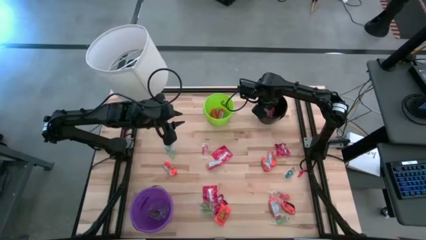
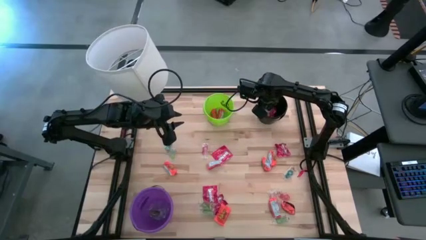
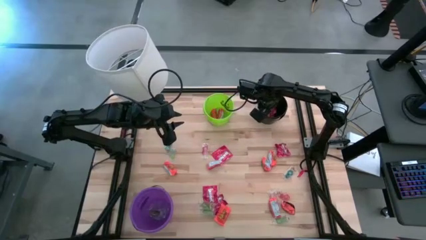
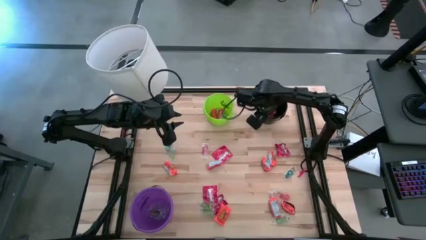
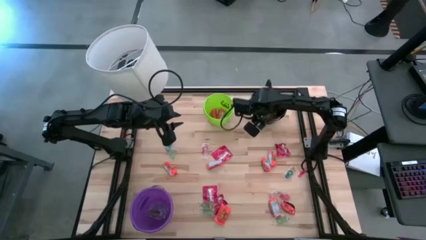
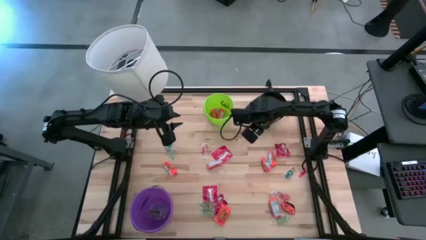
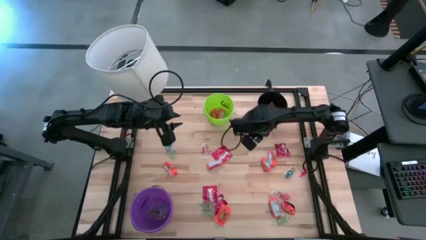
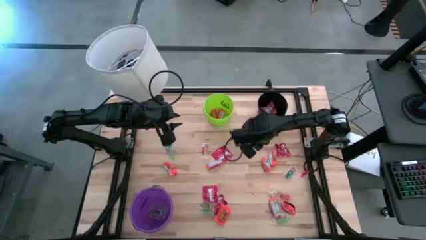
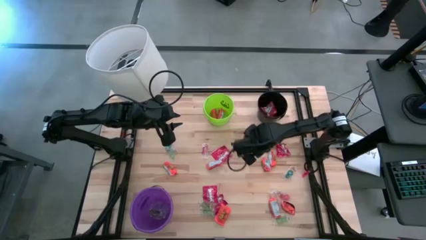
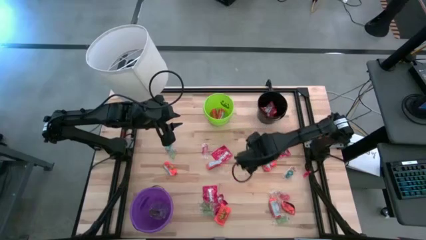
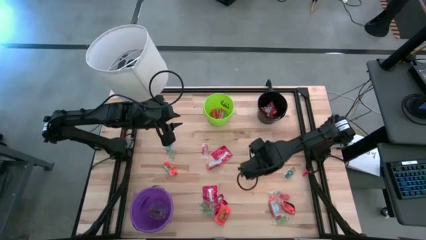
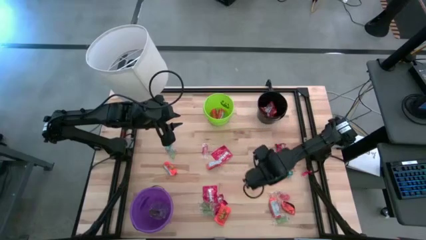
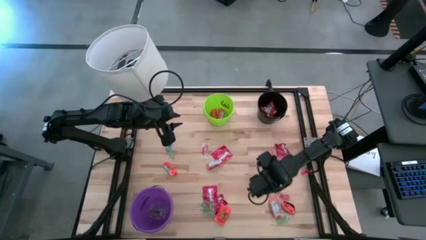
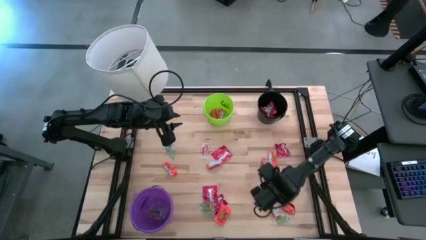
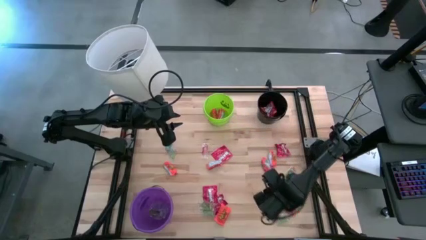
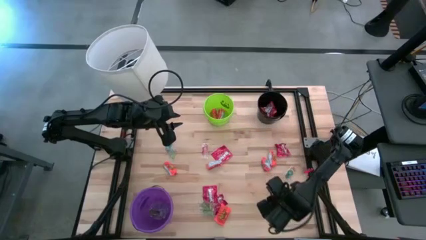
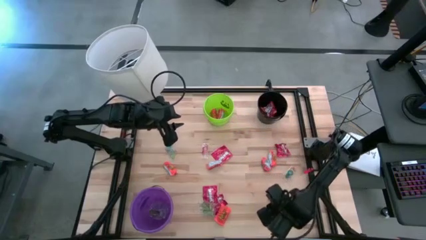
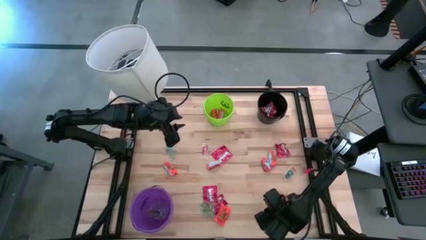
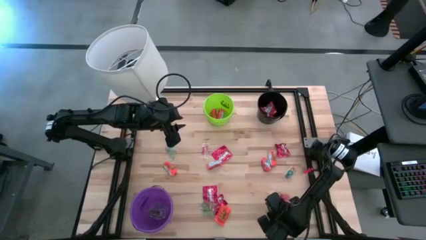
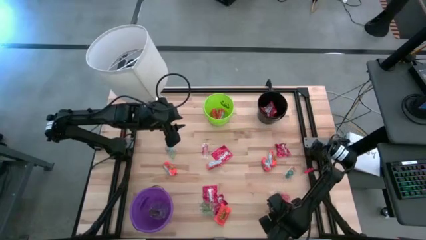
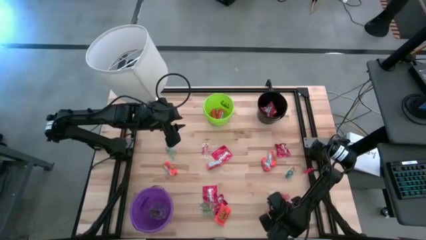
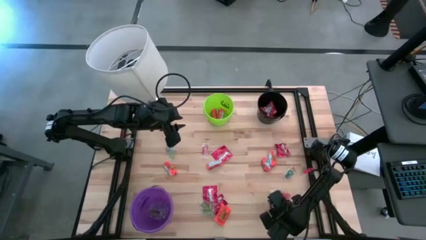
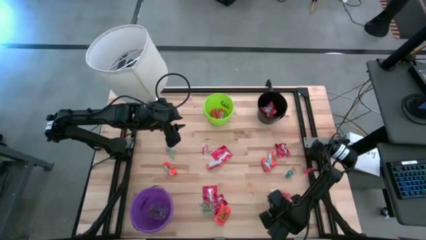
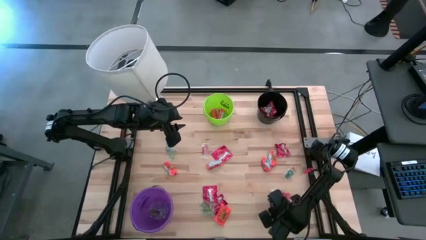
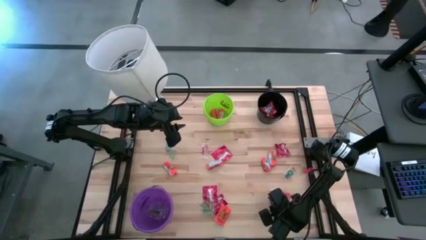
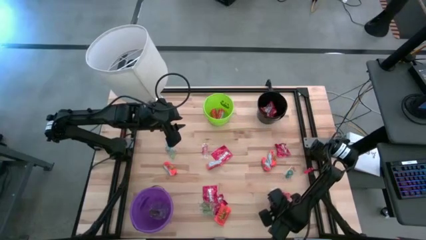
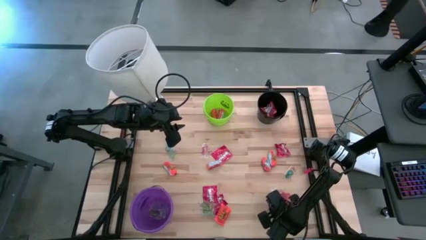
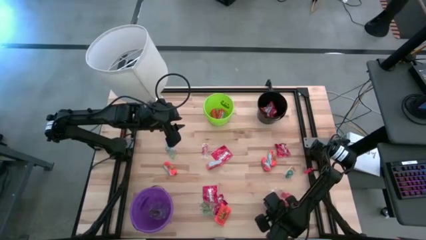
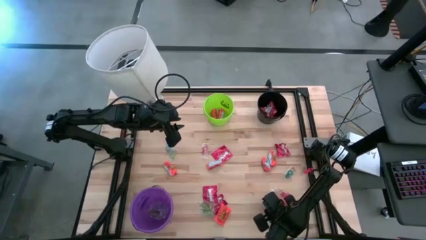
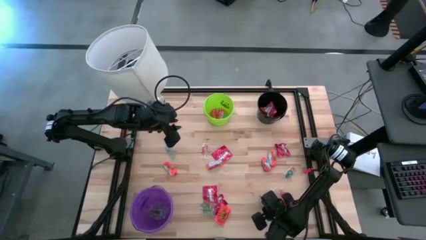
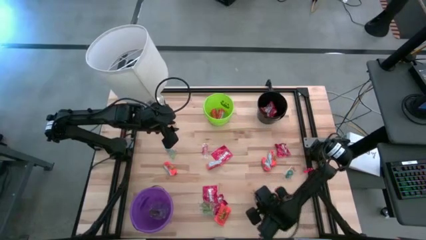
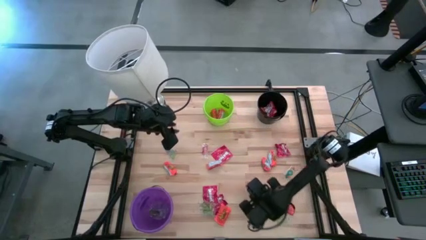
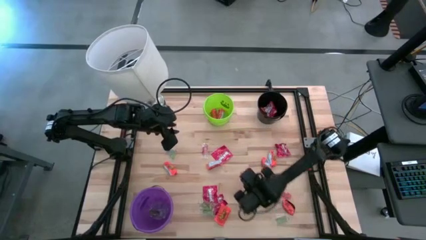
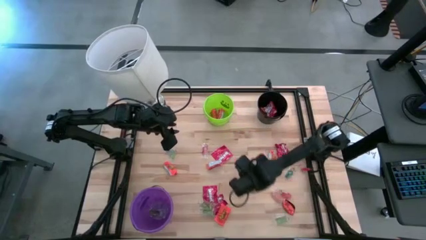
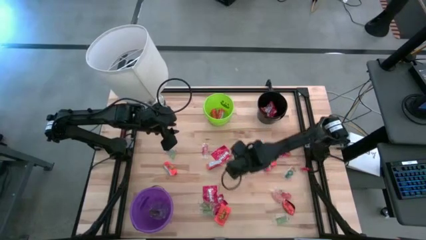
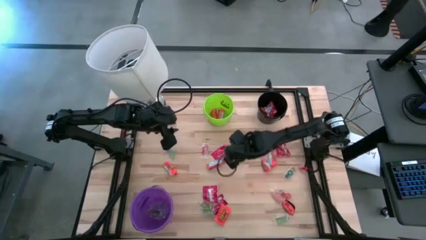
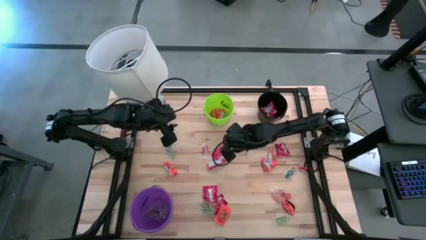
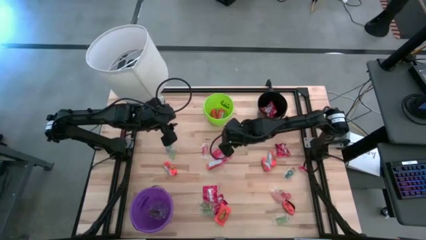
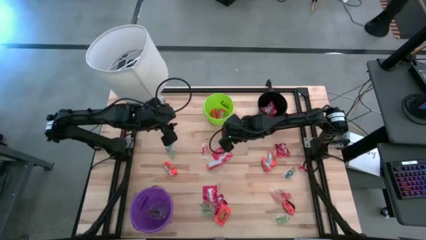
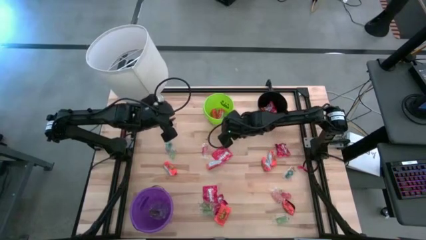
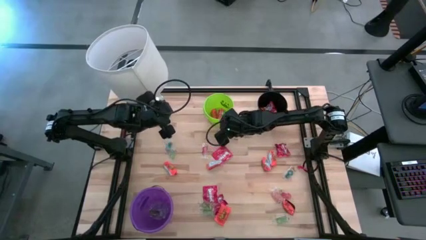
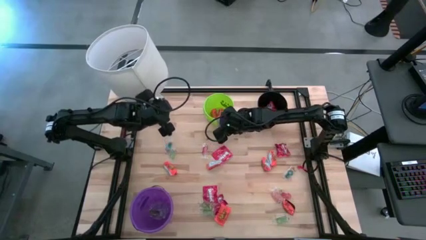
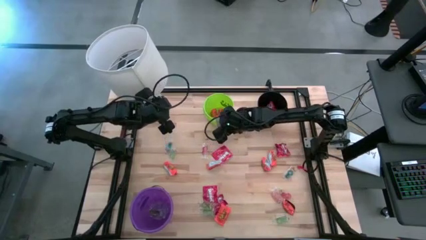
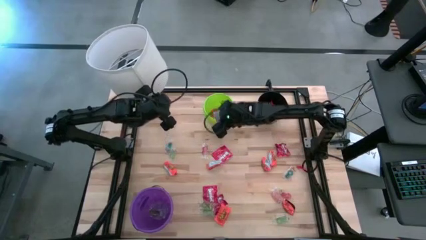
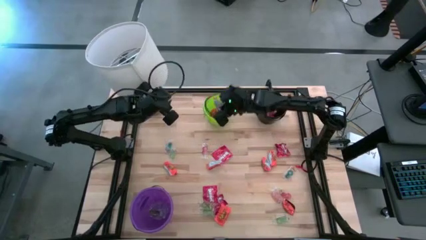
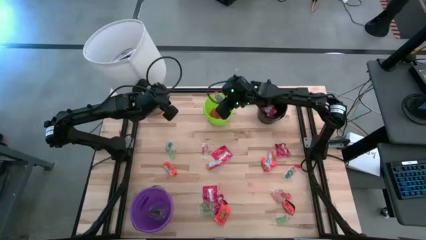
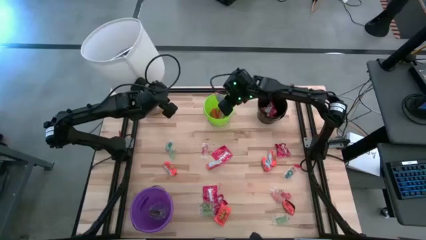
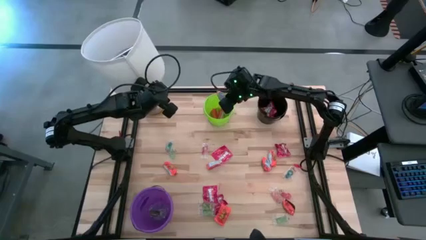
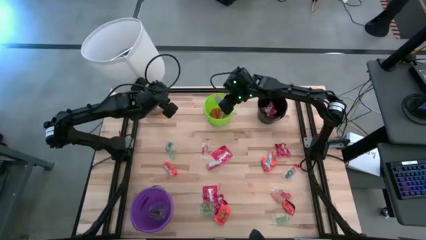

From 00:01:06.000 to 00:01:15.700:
Task: Sort candy
Put the orange chocolate into the green bucket

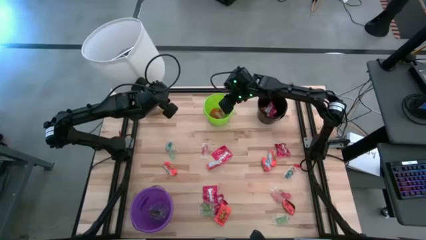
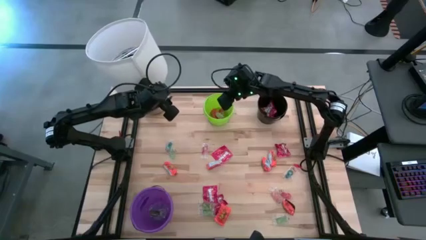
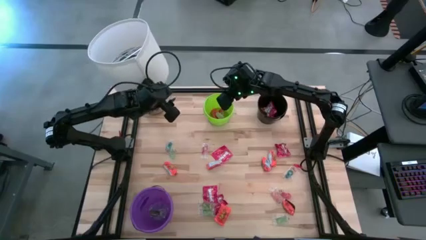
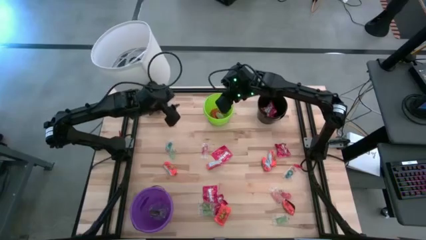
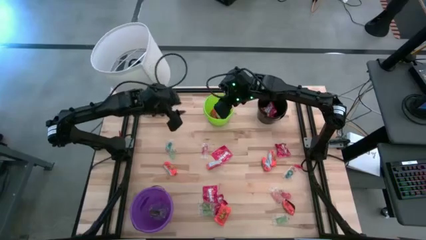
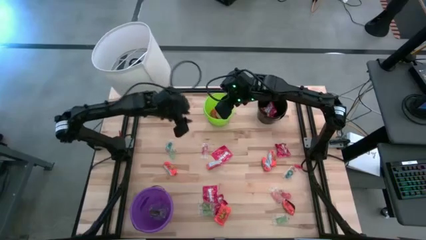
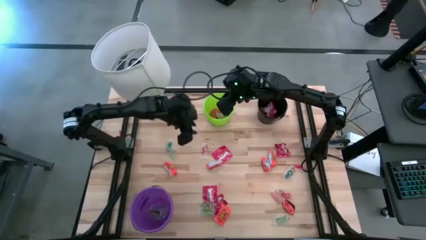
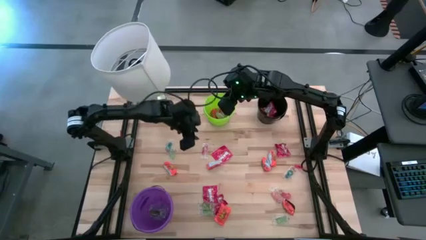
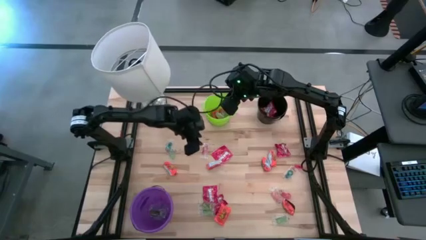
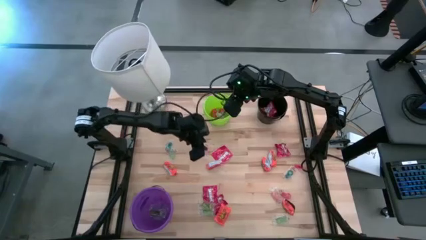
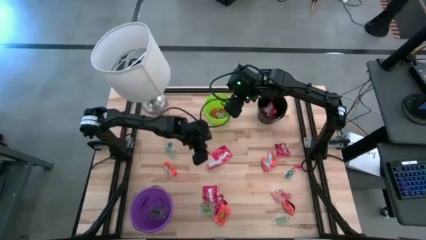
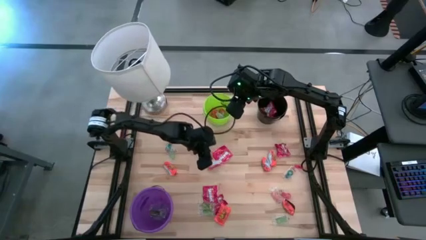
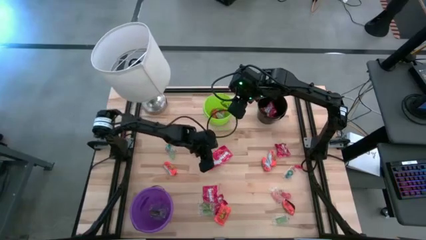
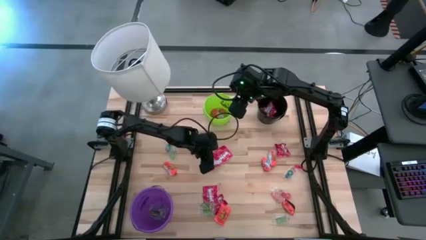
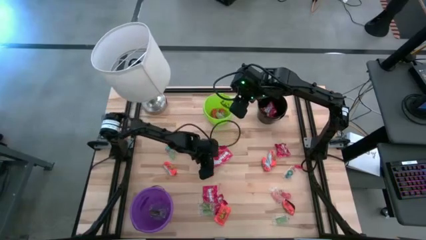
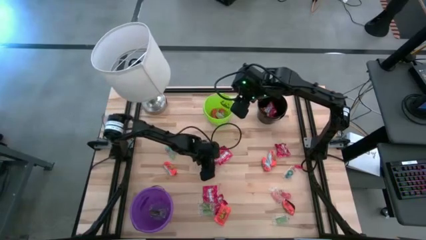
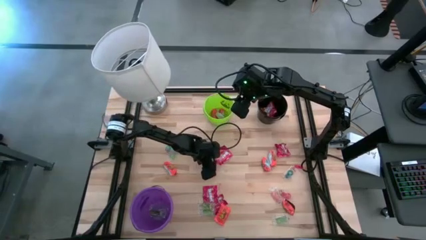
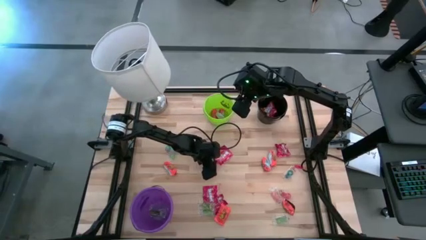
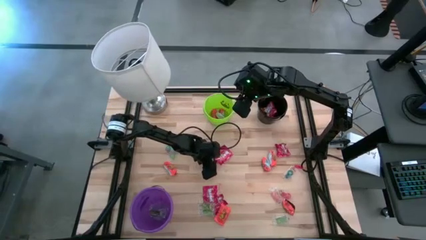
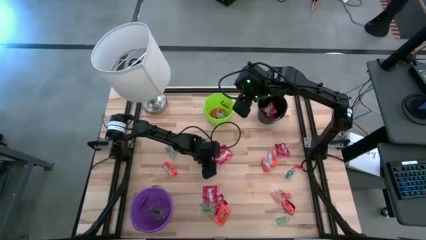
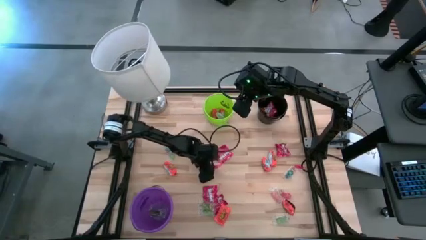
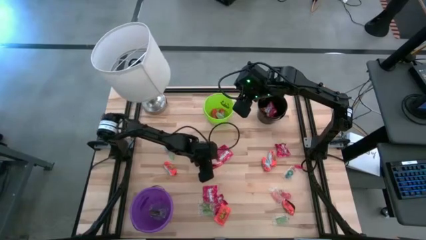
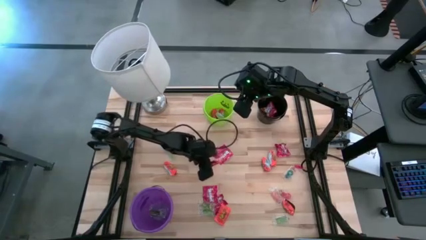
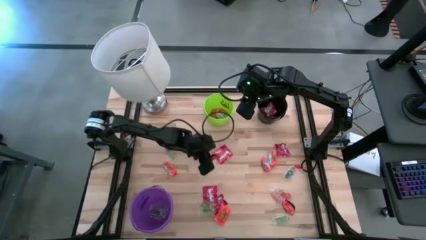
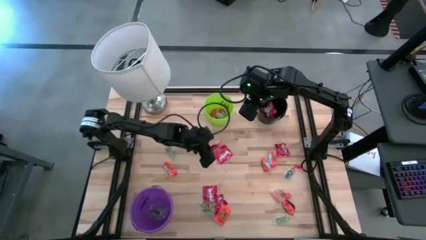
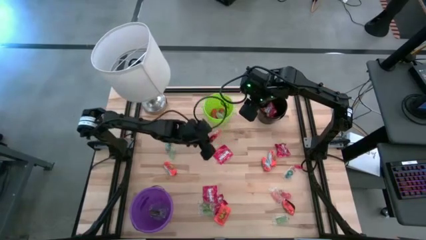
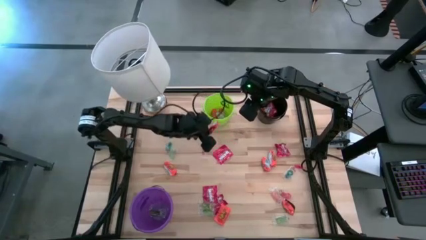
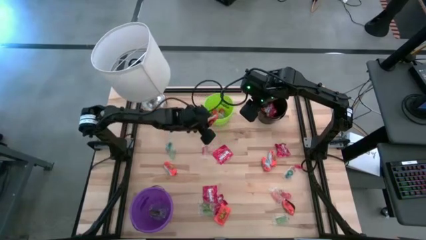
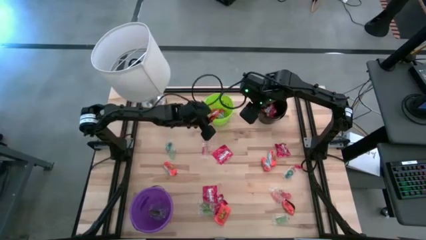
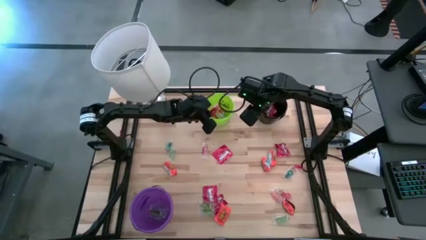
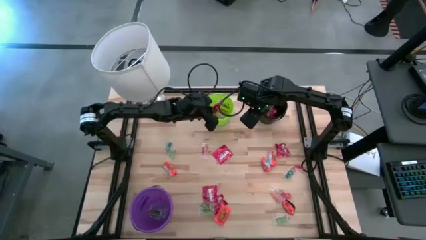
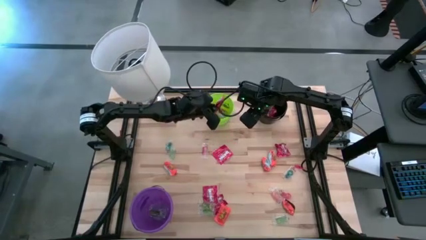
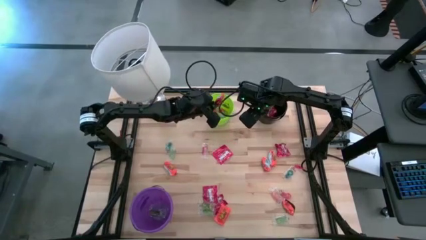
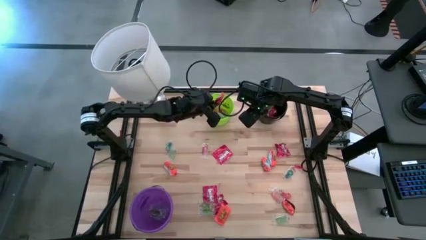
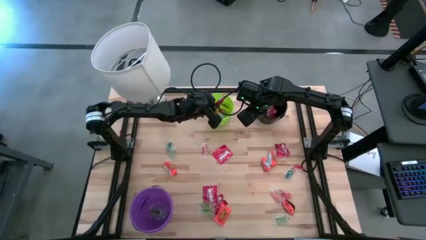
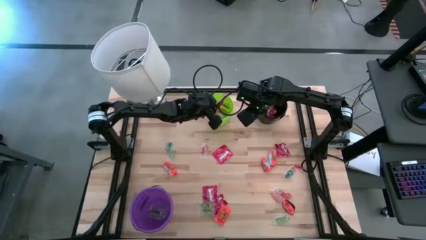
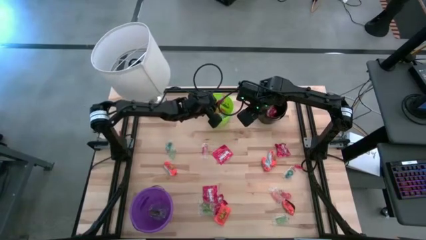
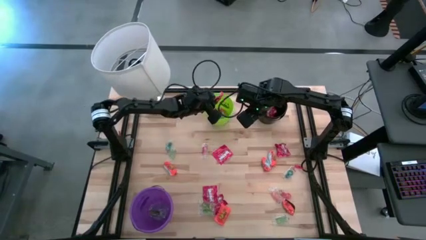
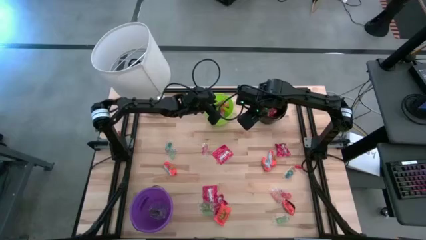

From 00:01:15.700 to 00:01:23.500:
Put the orange chocolate into the green bucket
